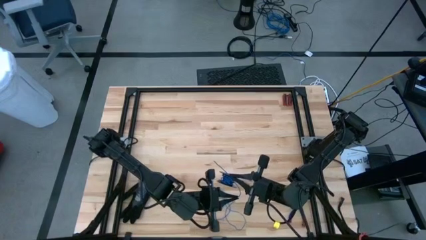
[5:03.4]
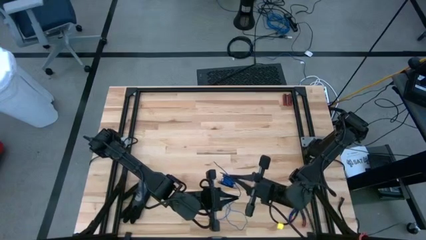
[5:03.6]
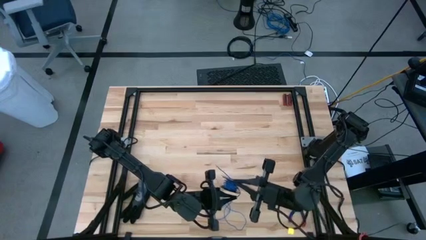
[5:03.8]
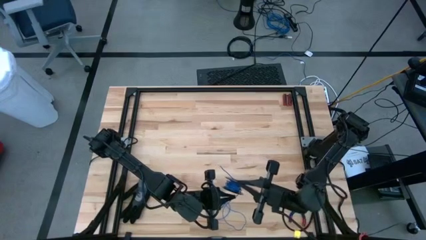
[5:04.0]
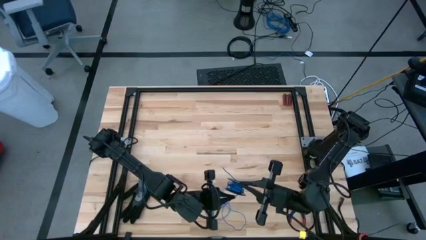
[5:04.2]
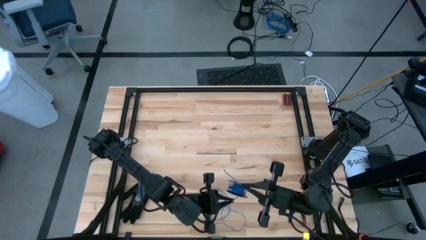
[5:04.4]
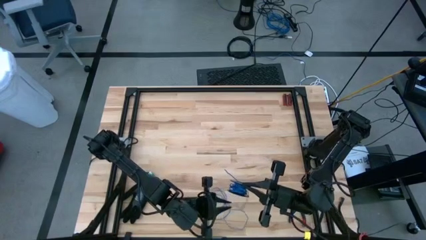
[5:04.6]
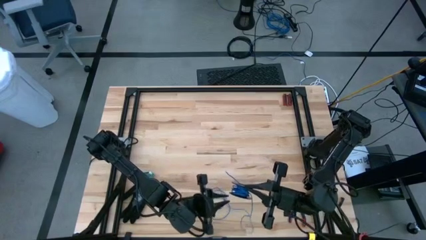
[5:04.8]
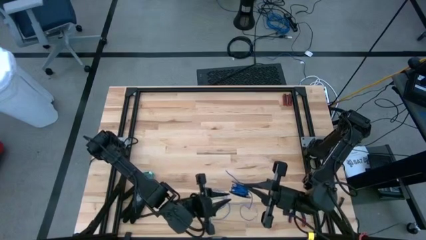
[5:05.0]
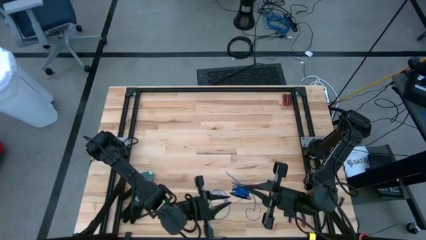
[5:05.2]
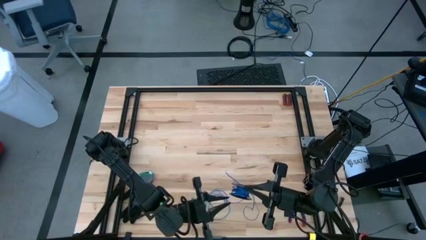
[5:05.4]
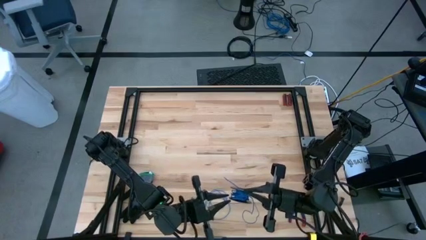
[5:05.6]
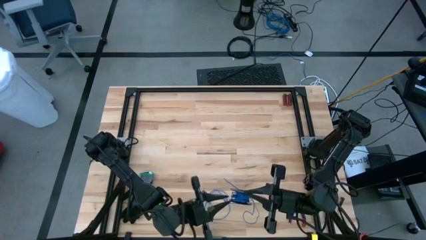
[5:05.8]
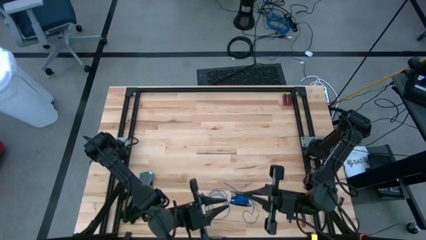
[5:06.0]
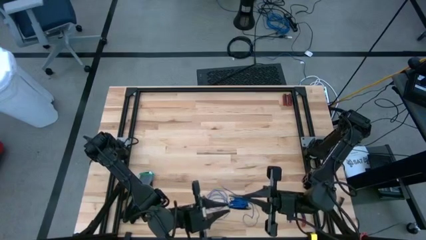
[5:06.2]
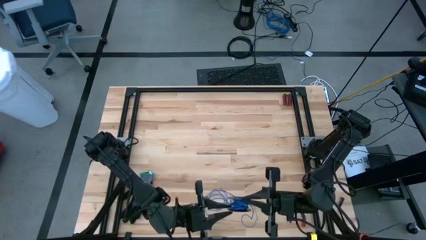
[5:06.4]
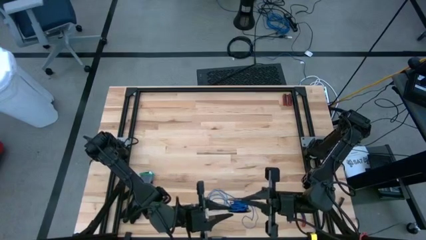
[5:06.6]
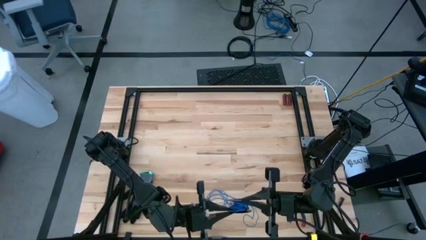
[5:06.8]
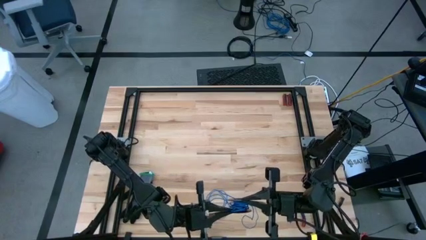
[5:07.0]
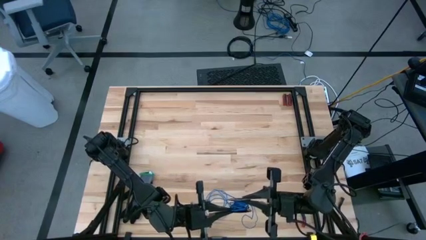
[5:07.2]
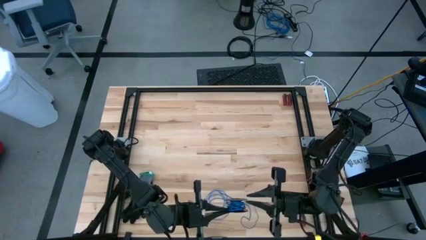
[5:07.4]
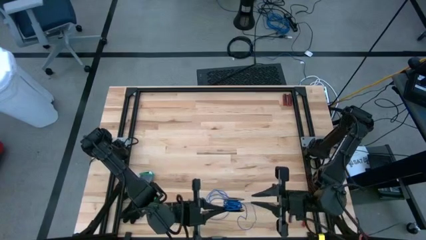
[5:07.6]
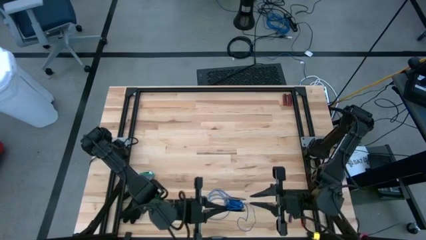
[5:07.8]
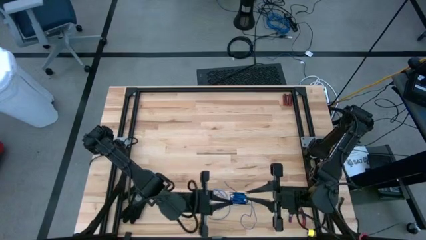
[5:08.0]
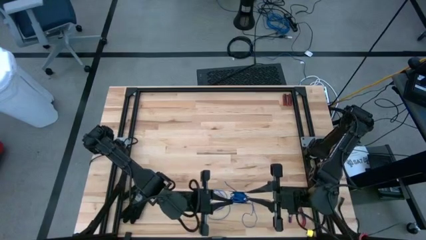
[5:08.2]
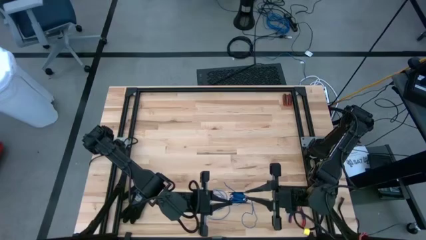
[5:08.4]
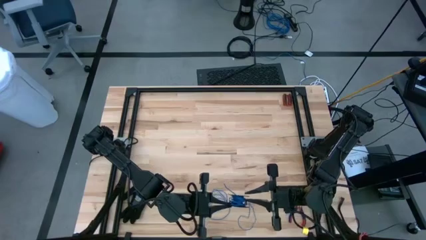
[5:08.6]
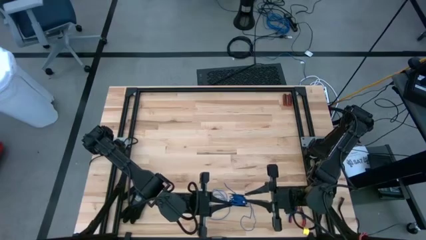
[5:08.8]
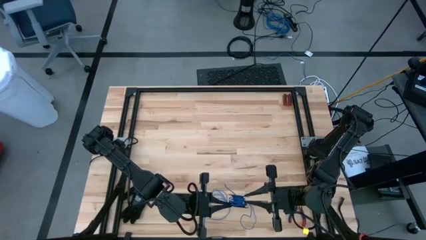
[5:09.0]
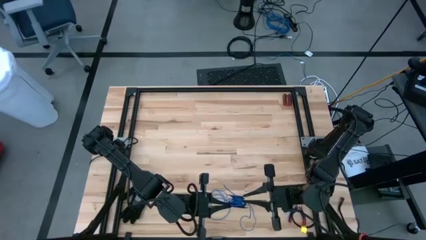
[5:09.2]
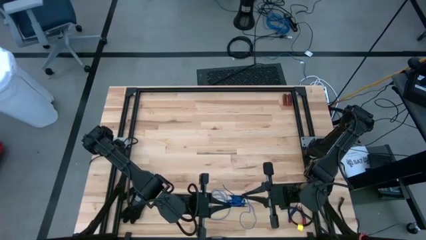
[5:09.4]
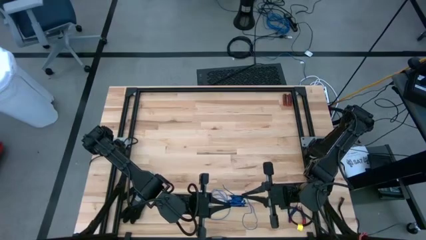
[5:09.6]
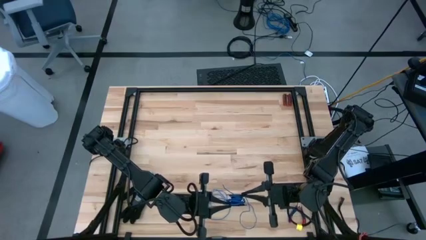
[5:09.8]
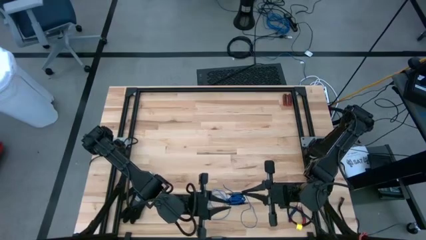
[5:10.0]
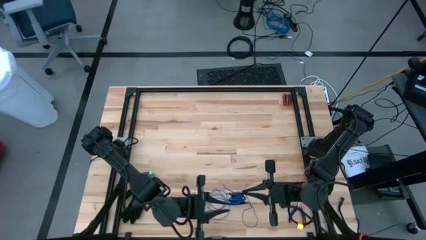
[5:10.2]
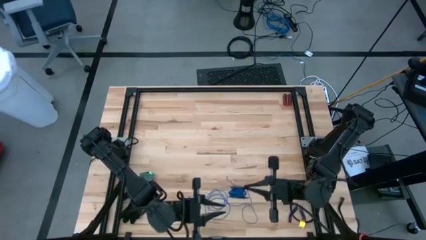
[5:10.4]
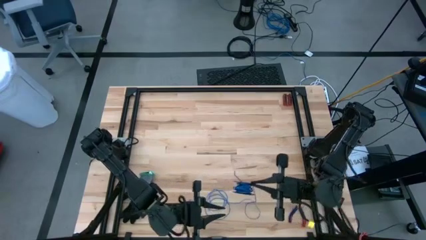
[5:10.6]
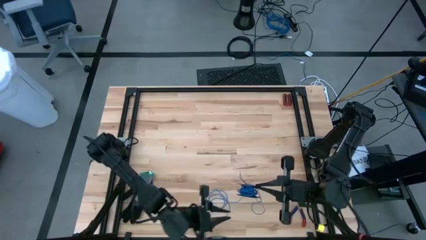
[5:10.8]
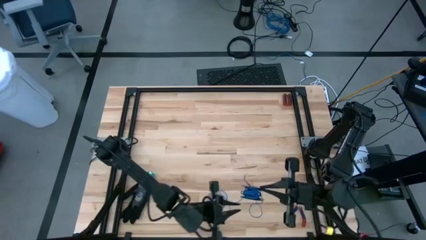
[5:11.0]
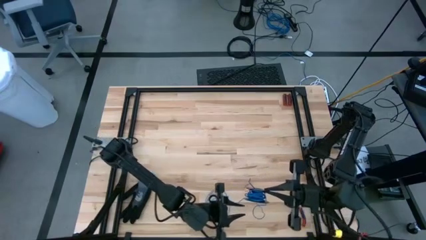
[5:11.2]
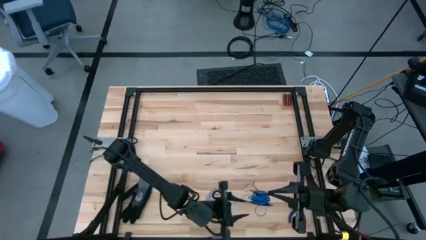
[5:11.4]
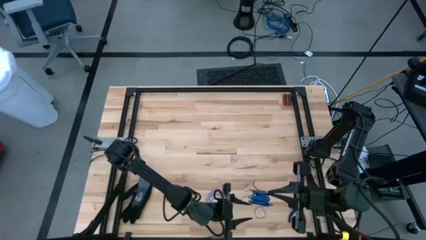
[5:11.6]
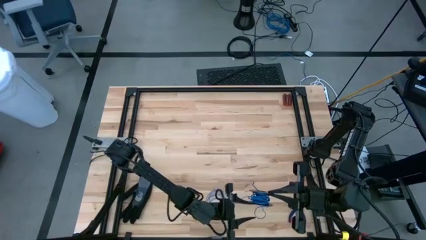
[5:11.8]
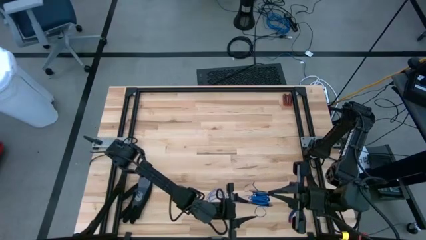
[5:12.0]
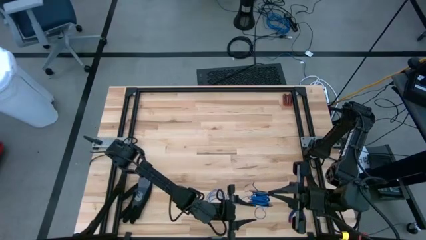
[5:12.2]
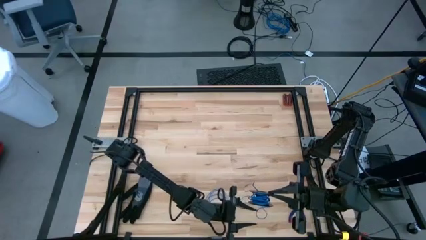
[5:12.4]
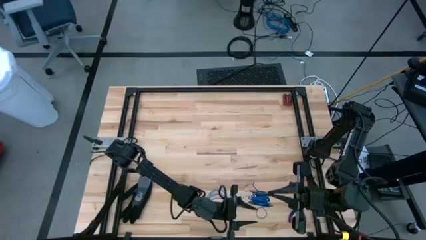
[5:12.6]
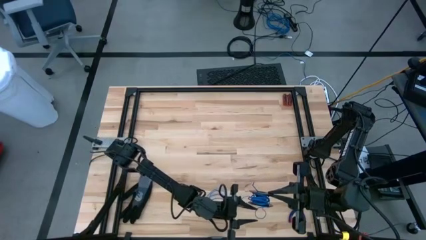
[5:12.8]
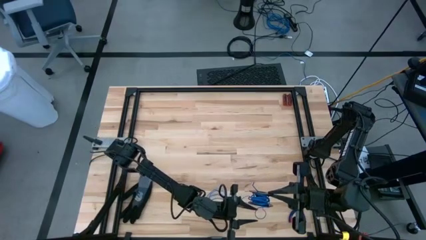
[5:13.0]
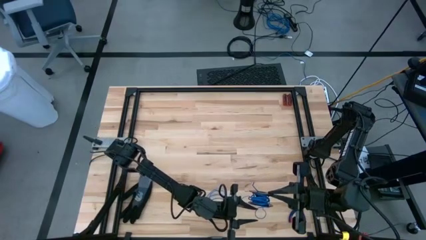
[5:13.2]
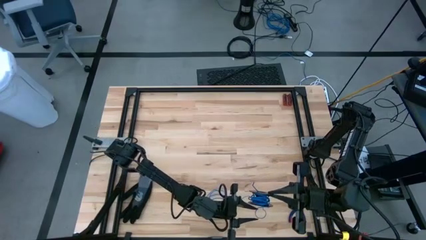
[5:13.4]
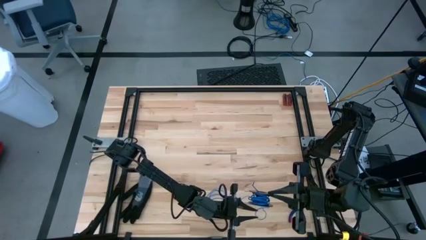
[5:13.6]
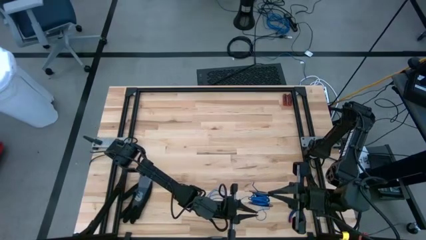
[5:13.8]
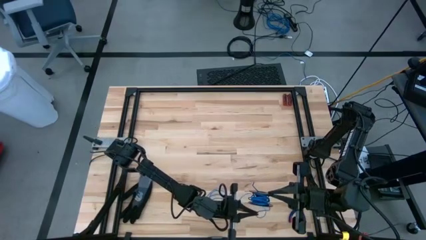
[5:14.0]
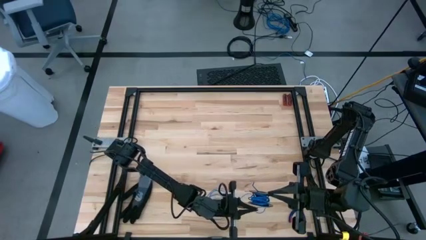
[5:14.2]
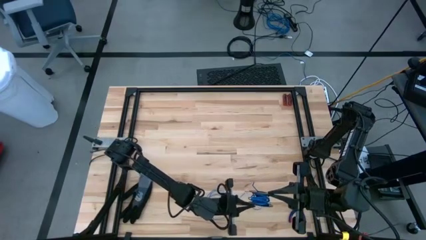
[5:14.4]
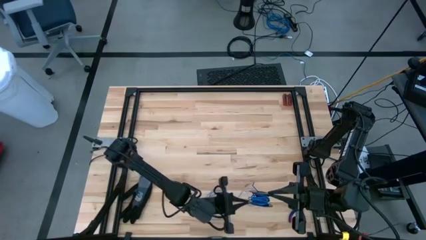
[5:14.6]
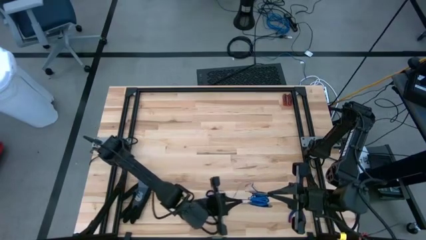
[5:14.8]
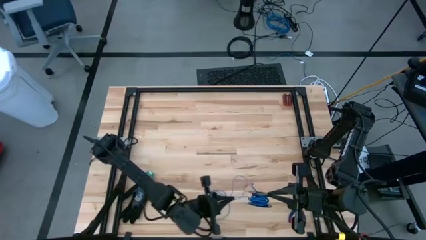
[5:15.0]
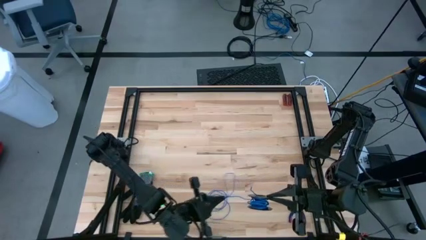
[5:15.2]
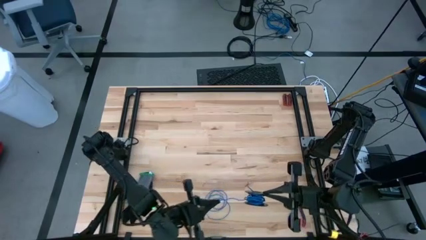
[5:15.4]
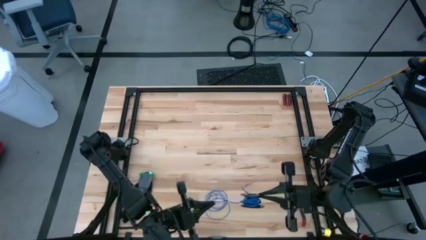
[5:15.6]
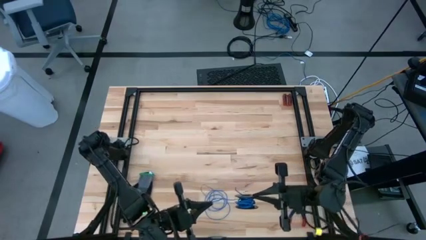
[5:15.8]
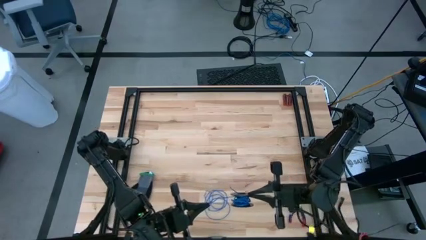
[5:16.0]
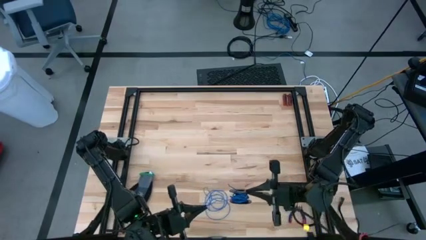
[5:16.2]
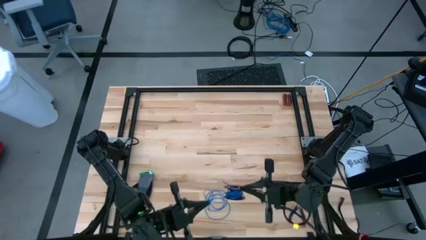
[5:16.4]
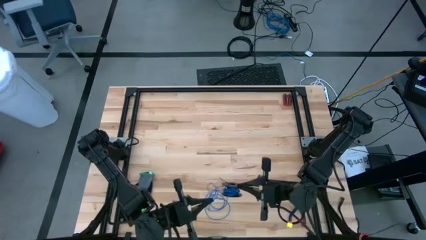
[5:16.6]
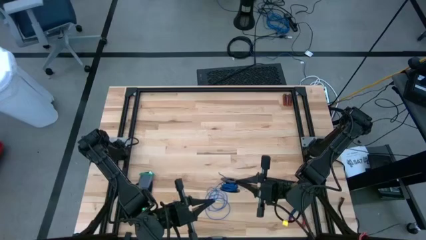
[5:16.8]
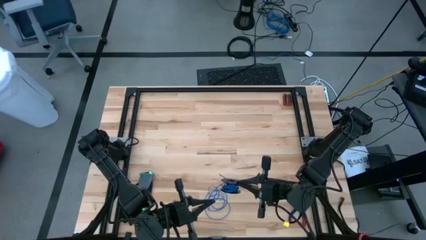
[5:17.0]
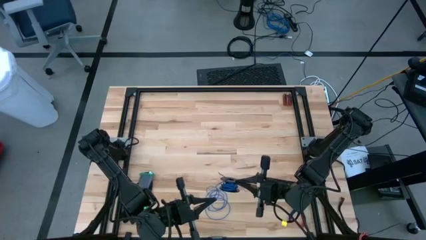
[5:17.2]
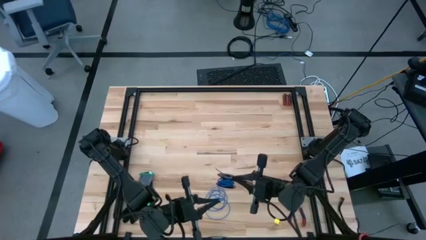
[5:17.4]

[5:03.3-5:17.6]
Task: Coil cords
Coil the blue wire onto the spool

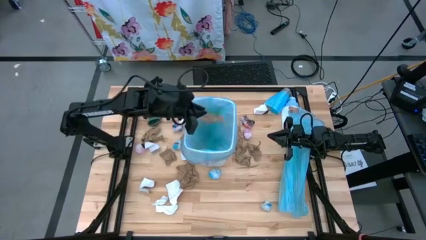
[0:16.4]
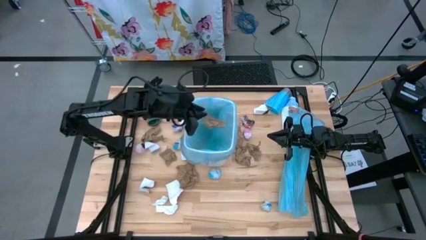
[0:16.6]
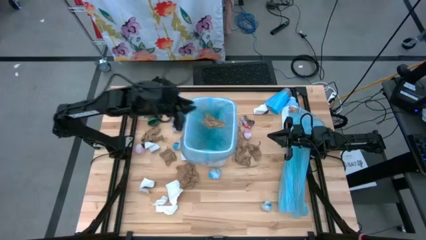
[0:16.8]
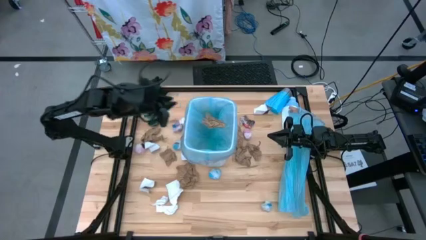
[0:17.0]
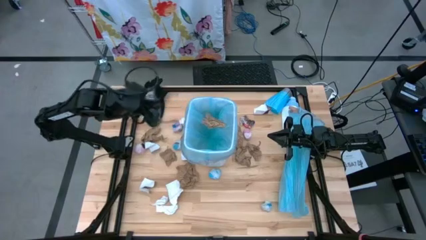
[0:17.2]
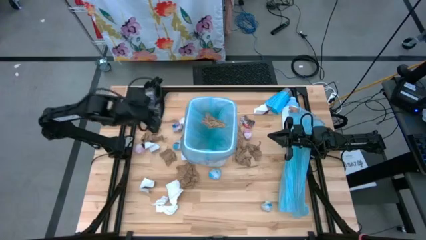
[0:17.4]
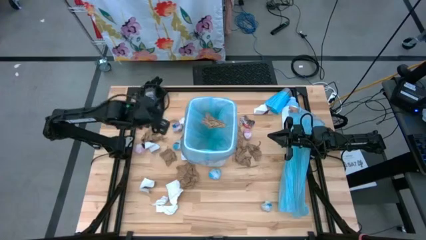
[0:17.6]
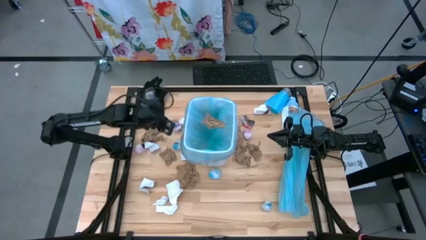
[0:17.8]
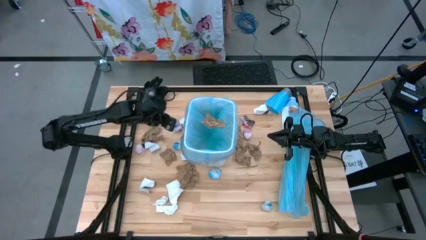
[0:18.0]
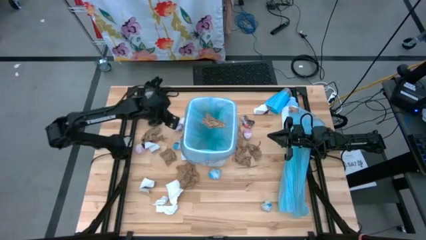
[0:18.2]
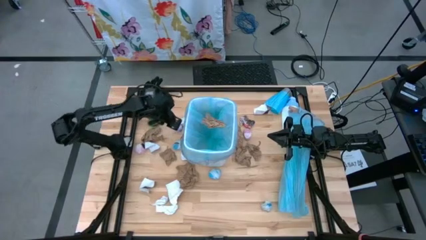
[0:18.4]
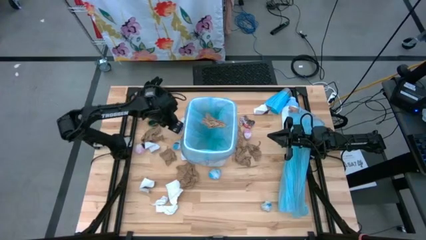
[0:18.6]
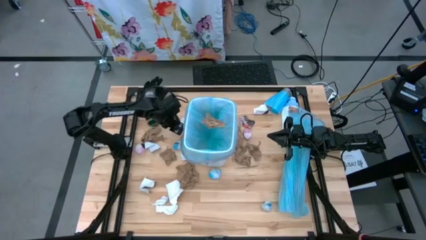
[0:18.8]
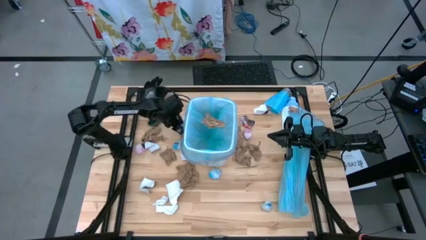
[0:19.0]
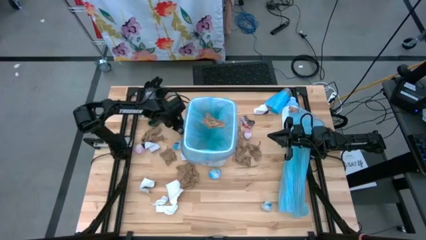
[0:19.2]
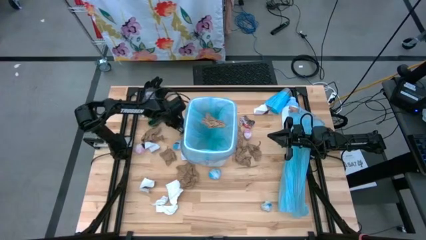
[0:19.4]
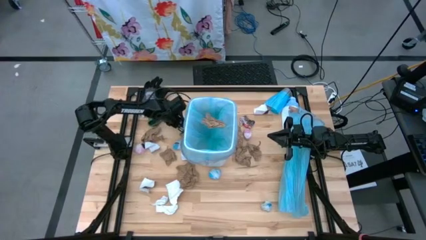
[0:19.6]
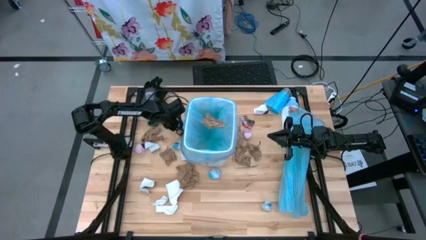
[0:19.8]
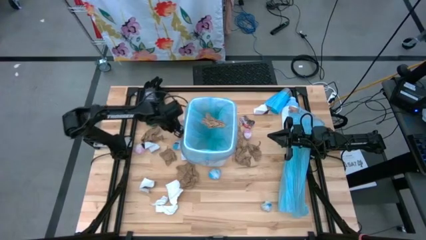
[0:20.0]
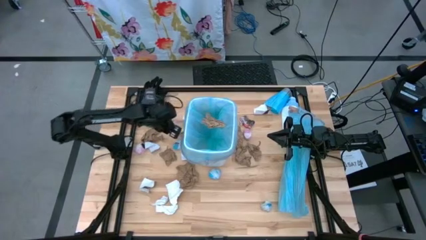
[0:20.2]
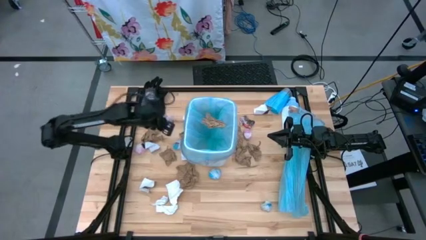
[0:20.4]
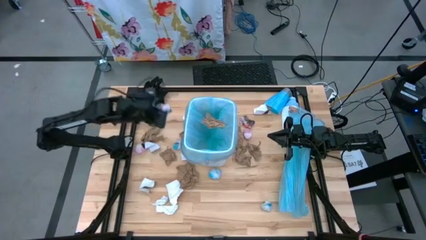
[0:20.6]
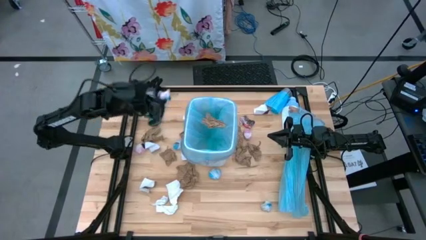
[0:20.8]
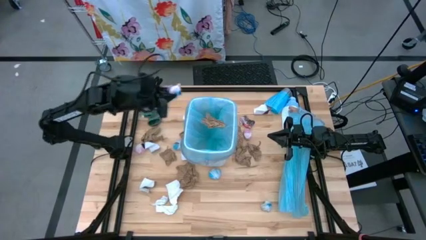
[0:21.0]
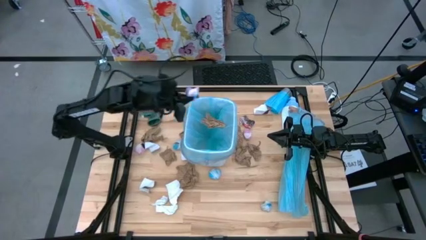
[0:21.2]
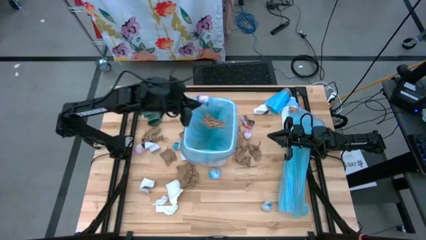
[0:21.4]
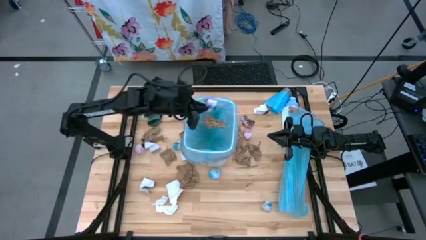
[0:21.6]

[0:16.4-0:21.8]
Task: place trash/remove bag and relplace
Put the pink plastic into the trash bin
